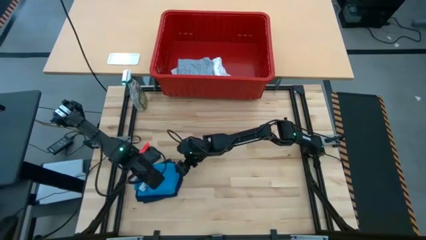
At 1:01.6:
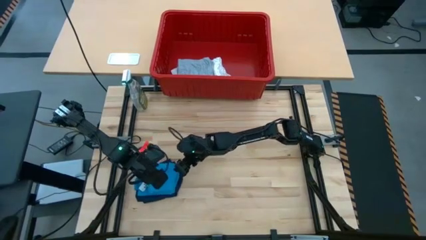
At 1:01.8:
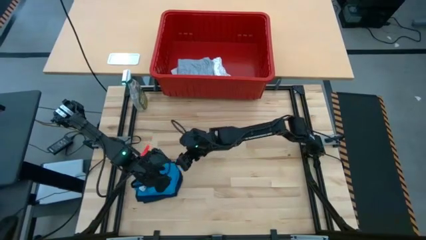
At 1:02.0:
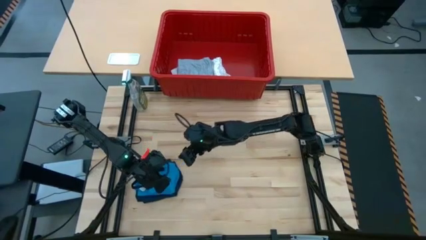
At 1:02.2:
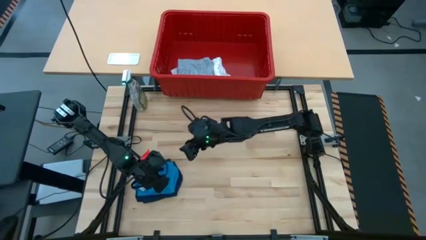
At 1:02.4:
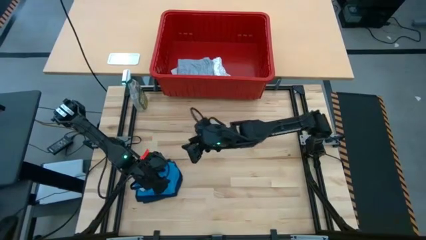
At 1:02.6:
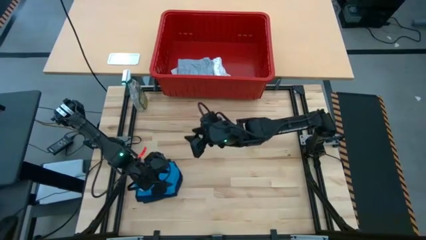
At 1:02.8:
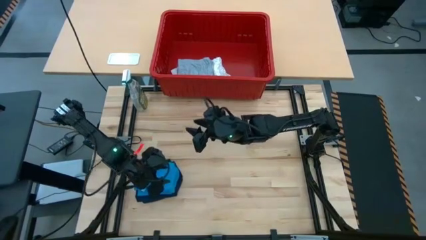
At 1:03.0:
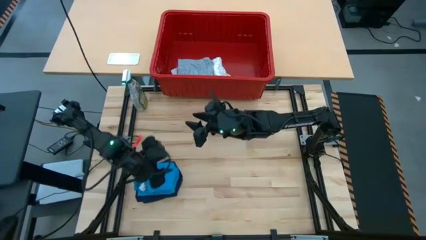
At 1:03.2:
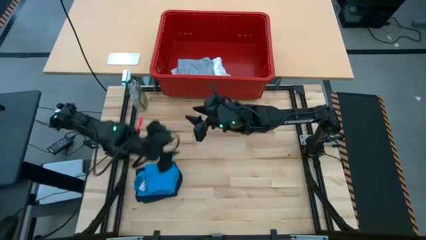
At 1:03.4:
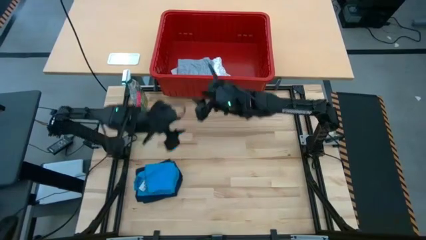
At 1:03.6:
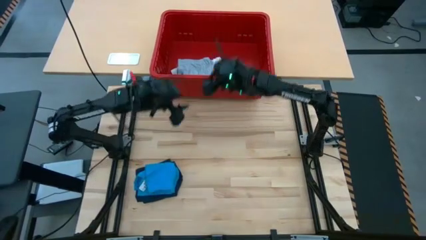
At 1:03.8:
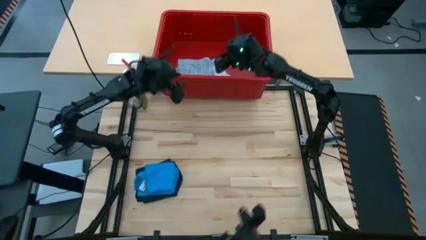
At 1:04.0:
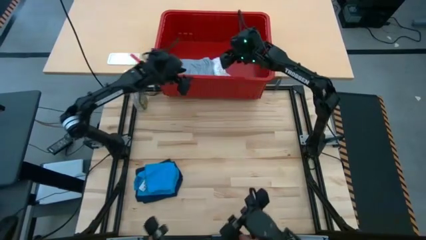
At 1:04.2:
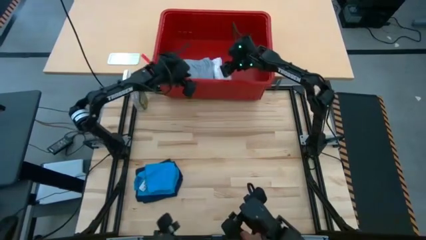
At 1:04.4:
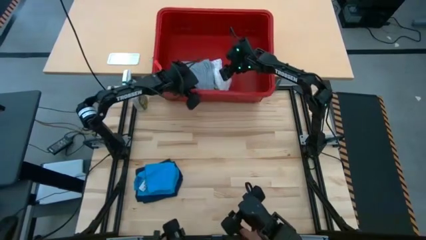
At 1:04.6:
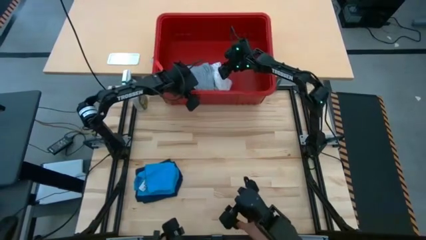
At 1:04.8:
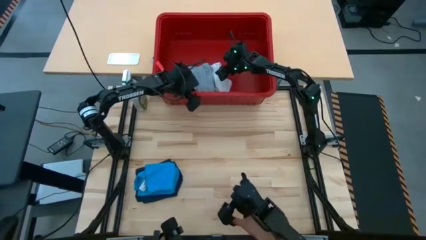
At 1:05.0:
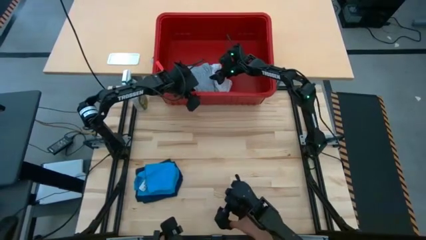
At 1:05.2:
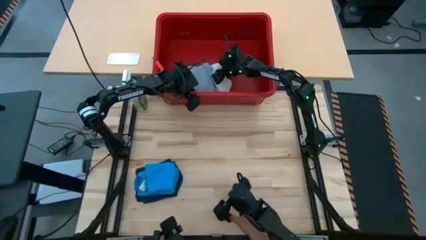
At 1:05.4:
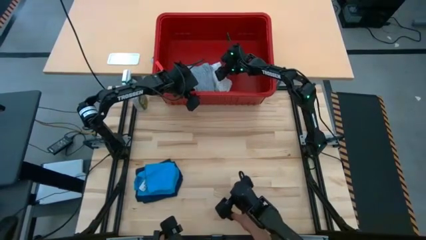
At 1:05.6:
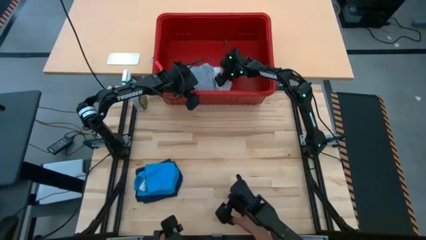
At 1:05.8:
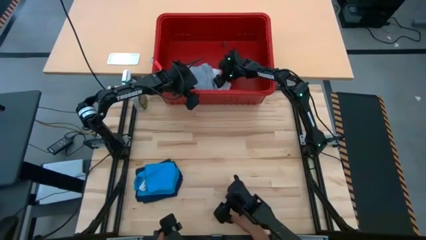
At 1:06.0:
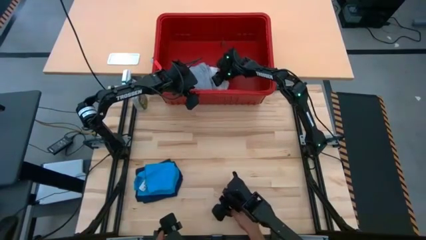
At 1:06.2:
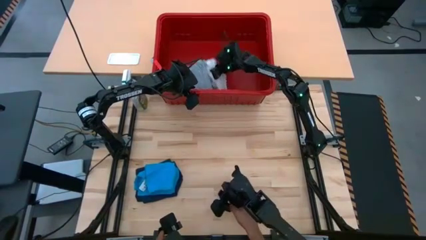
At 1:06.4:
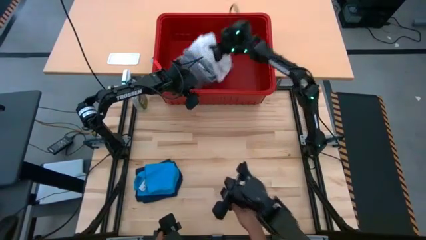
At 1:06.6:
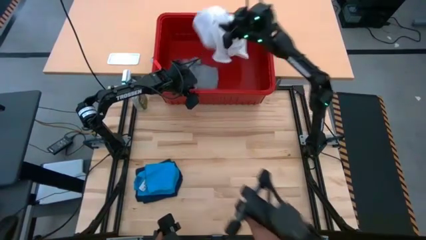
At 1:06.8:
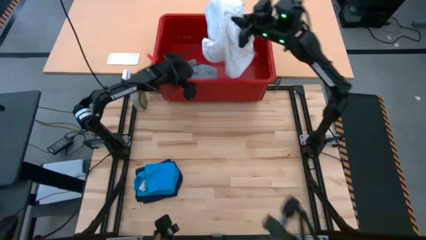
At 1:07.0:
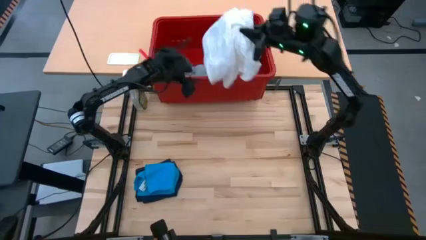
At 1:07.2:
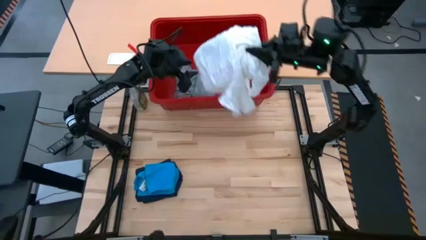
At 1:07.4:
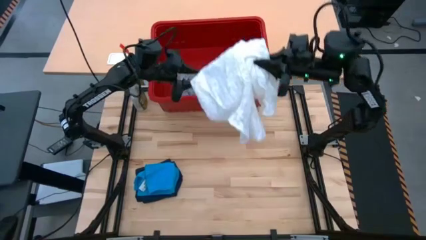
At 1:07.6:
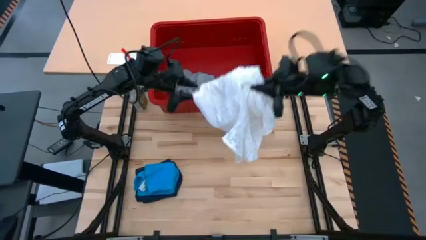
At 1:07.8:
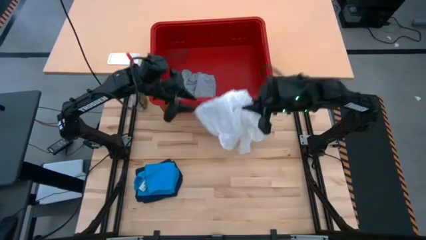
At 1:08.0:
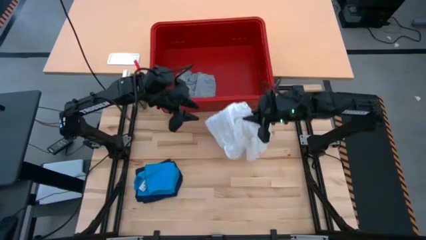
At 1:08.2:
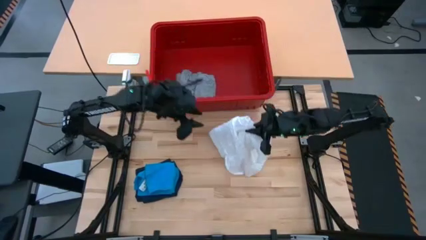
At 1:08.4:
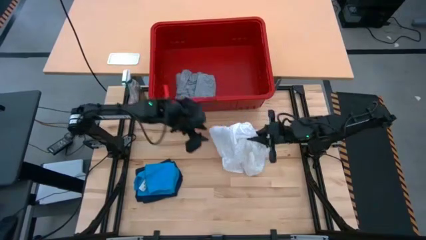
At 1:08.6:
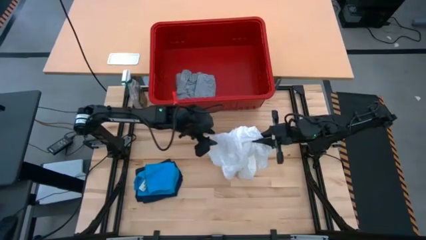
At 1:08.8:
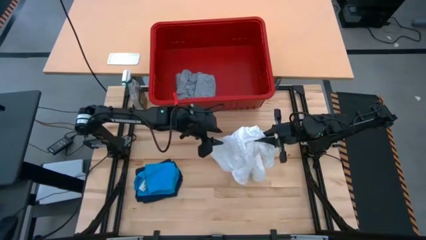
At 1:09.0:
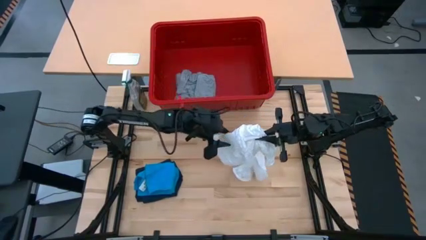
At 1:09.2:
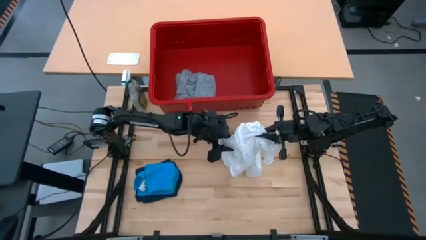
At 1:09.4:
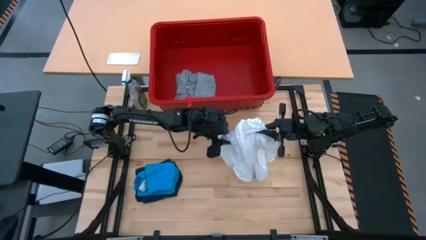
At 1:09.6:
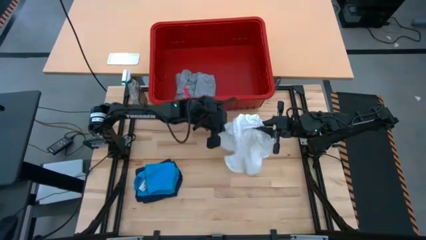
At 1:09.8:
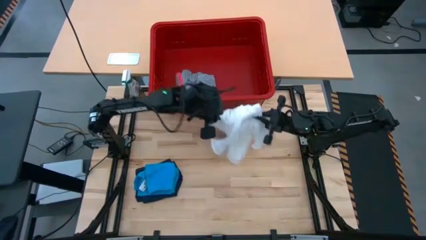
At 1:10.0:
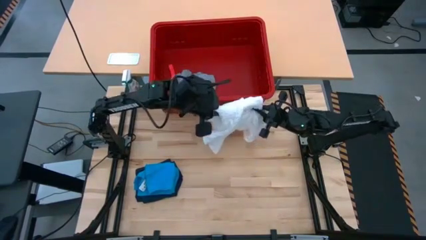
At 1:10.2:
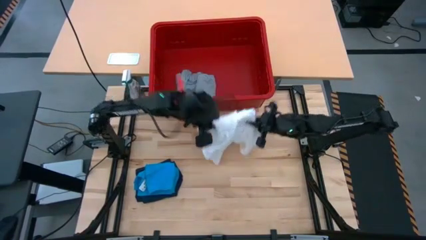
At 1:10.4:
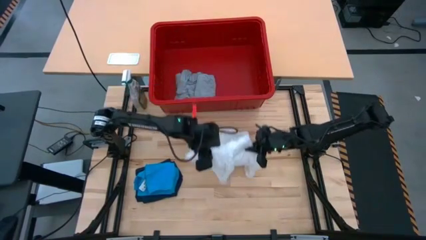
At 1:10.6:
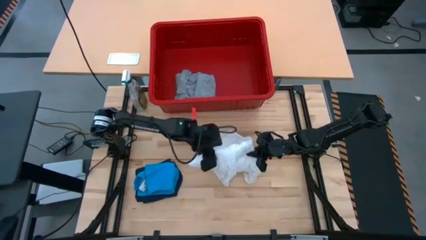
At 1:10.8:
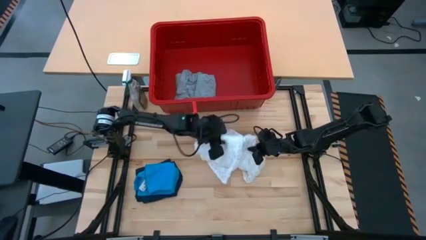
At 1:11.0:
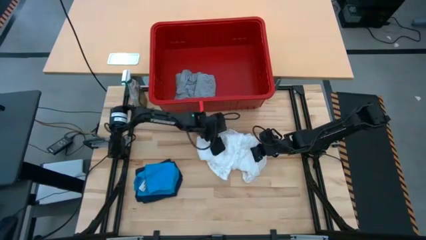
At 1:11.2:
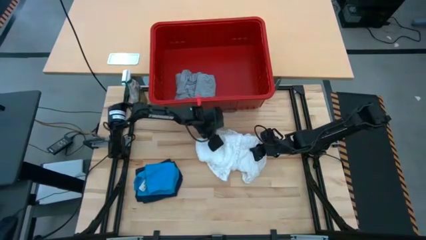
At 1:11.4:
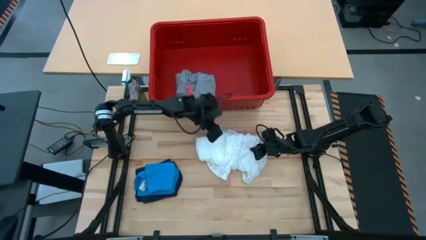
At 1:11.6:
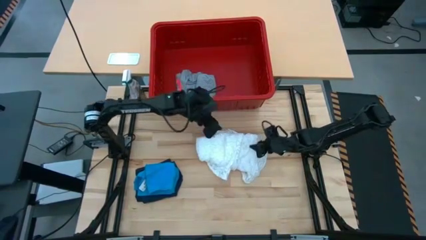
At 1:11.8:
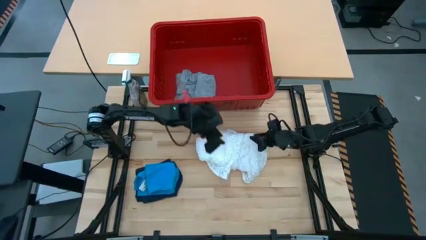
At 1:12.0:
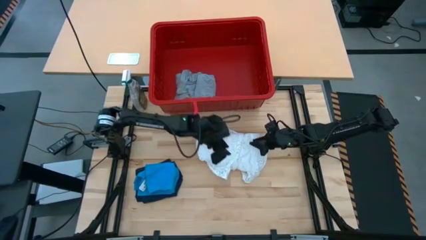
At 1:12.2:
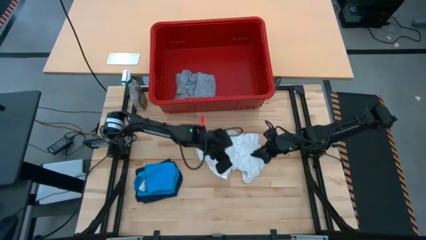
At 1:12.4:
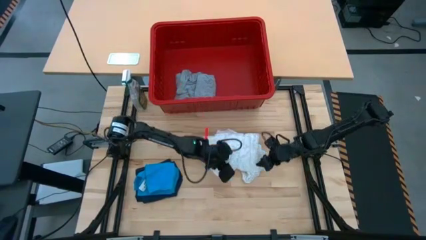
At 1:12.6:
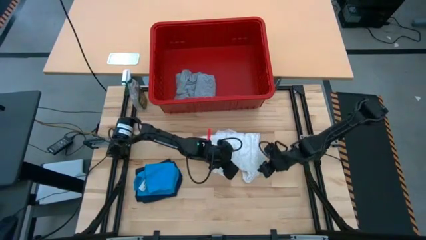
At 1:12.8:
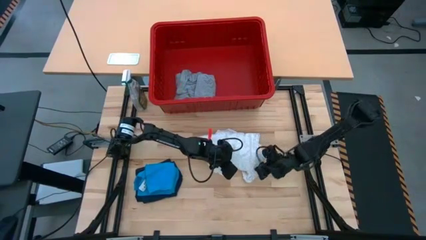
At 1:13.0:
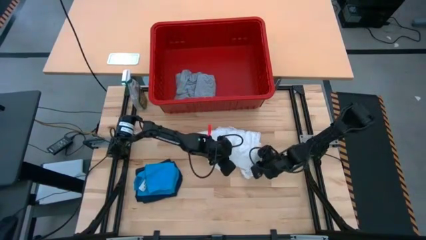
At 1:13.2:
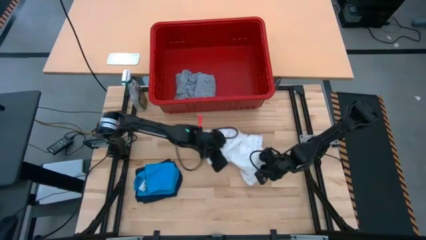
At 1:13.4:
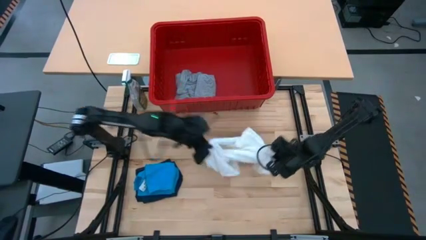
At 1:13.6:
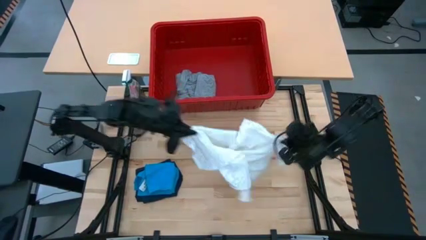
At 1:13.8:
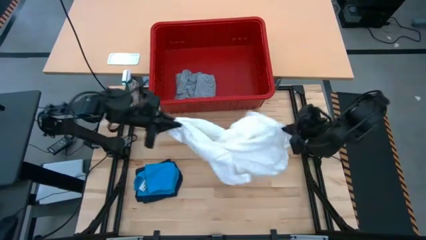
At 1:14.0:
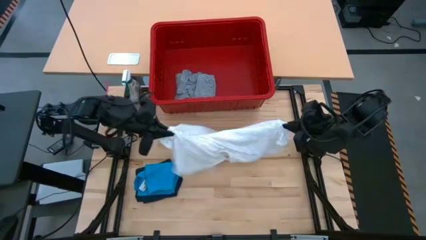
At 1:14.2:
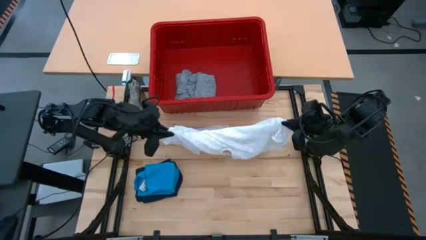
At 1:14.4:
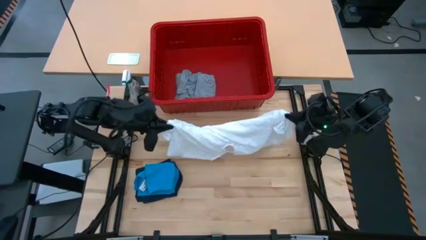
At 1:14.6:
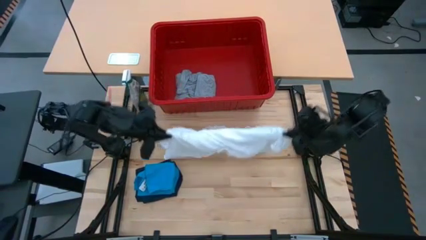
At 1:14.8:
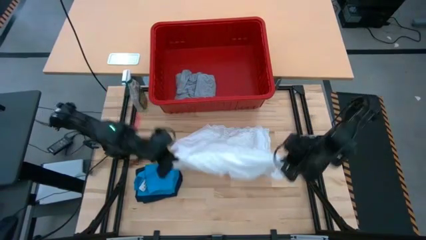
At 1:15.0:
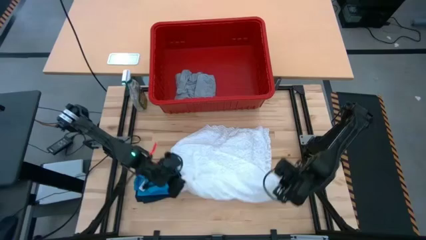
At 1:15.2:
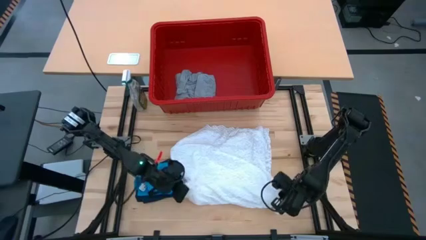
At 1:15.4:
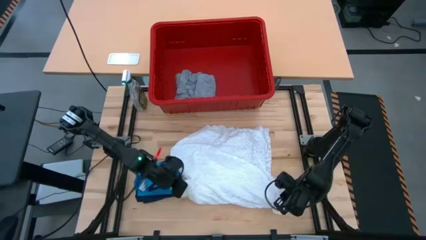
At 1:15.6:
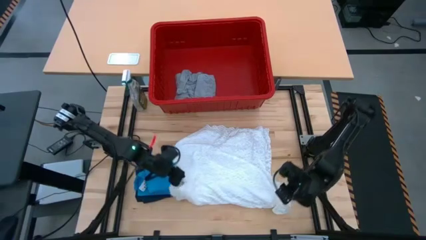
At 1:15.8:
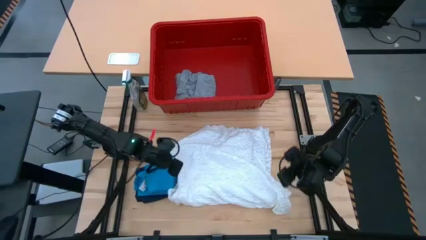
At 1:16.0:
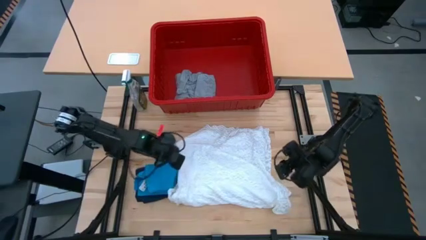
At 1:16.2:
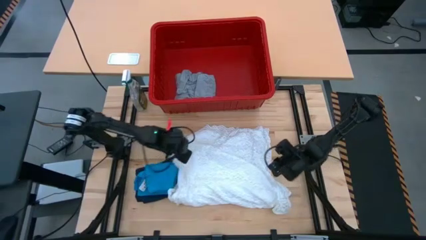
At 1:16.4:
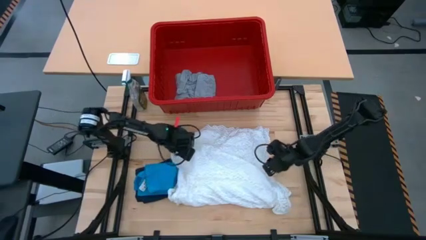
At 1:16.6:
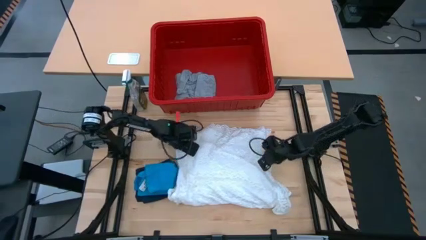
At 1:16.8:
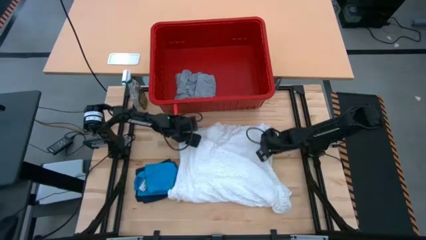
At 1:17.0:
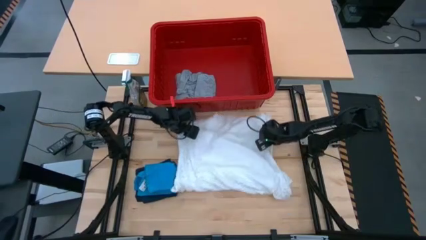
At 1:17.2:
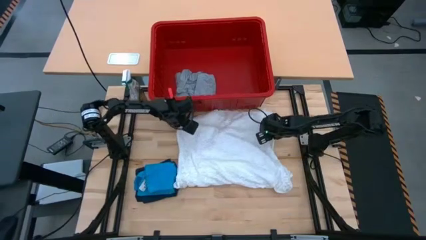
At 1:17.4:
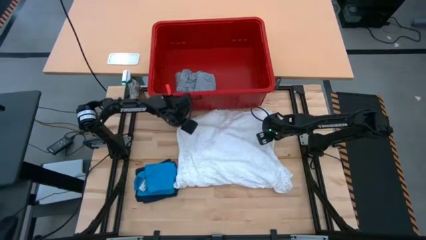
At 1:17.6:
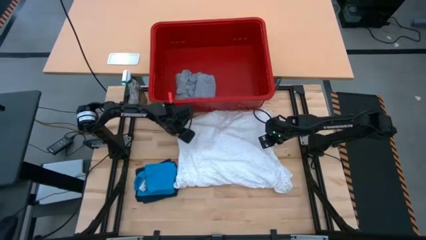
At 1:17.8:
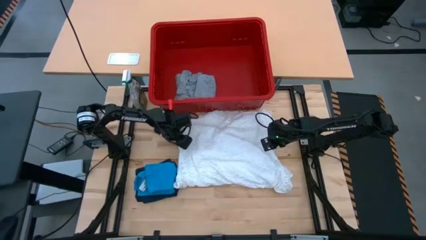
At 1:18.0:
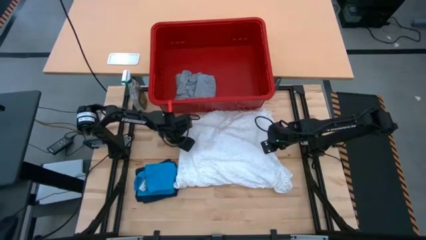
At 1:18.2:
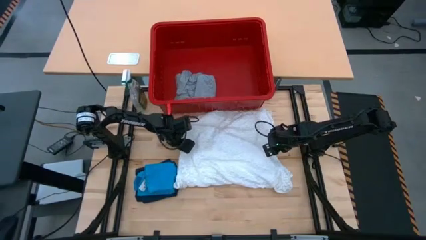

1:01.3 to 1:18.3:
Task: Fold laundry
Fold the white shirt

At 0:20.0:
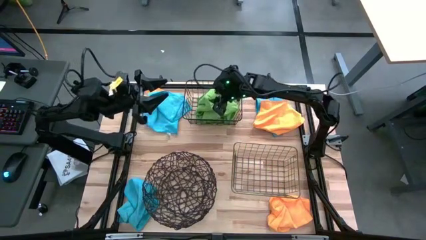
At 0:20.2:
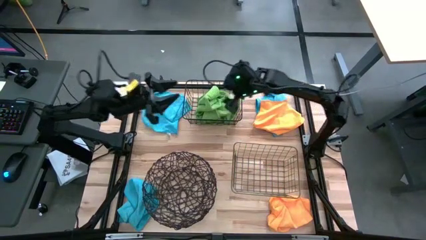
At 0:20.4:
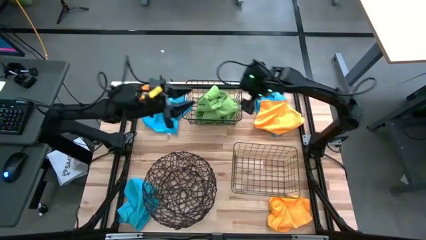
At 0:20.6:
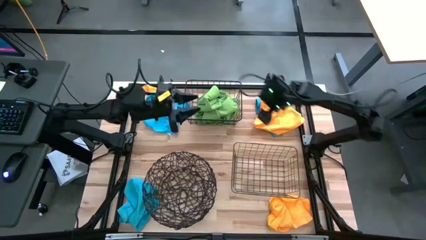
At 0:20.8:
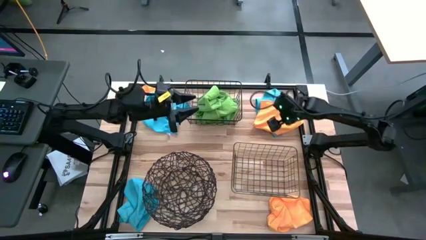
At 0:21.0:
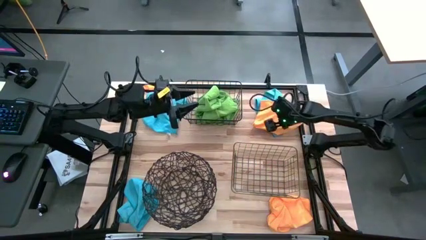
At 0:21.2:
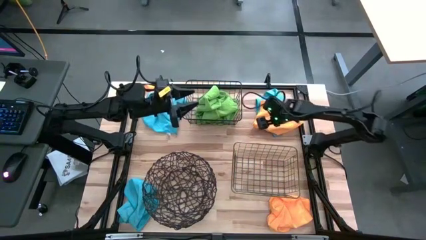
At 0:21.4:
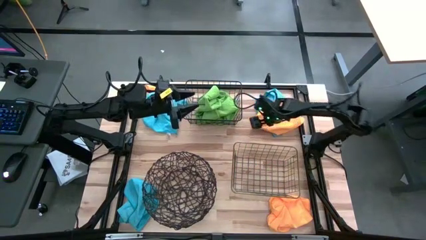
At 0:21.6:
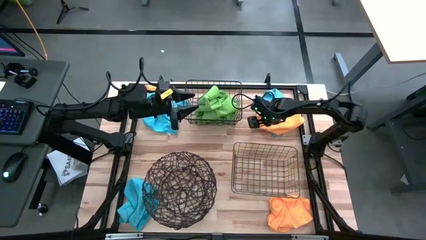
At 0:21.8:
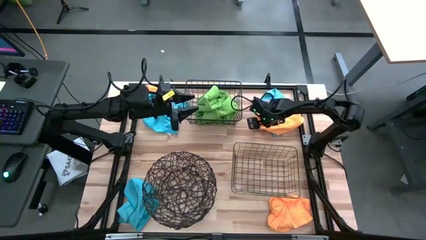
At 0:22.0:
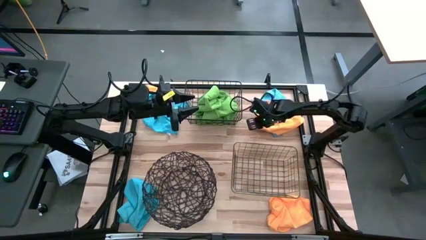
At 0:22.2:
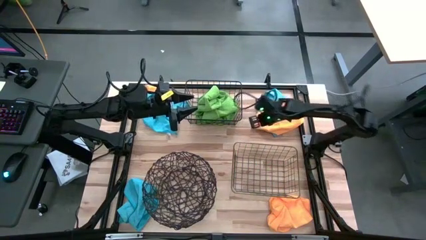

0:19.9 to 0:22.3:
Task: Sort microfiber towel by color & place in baskets
Put the top orange towel into the gold wire basket
